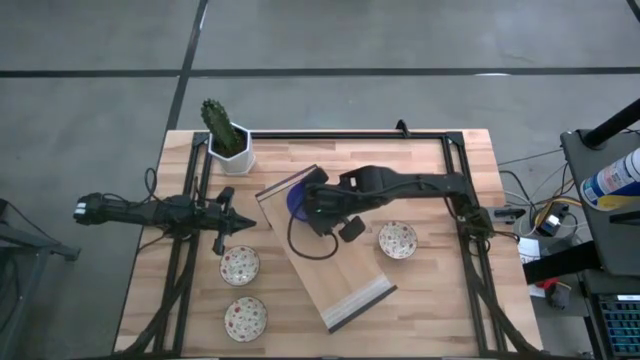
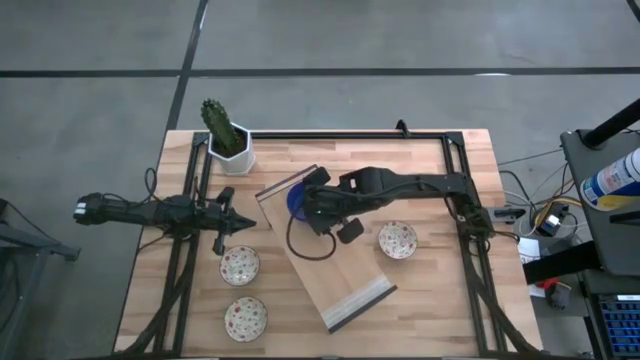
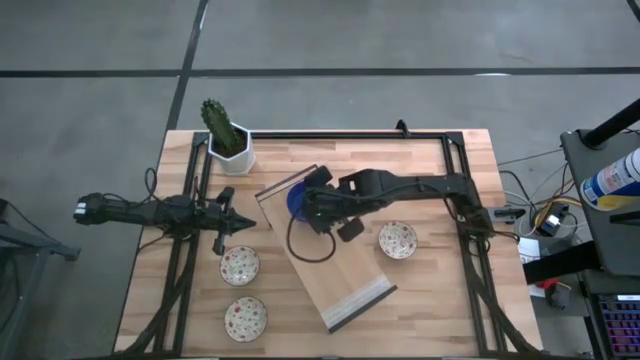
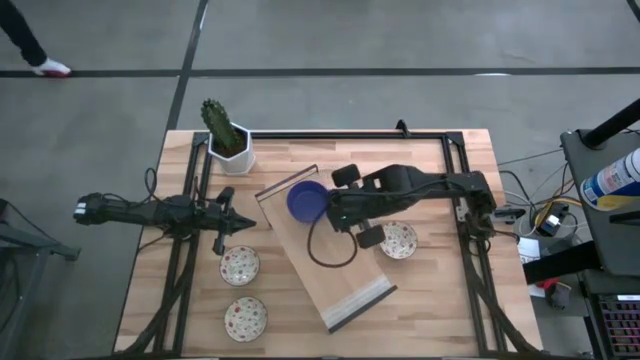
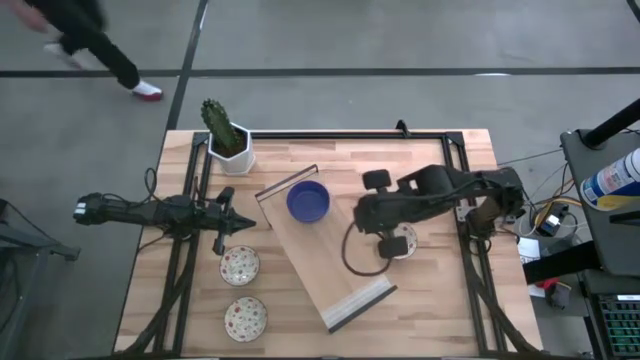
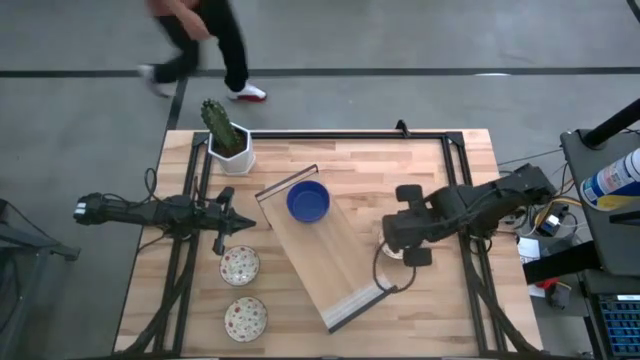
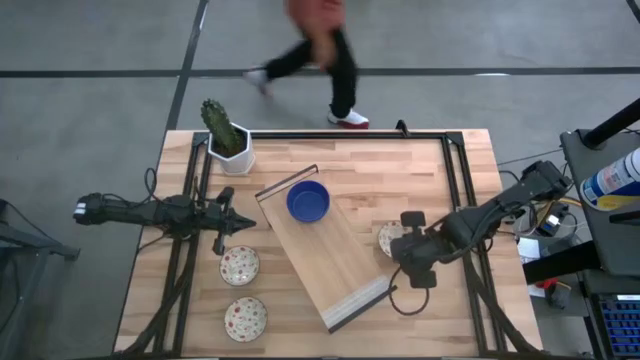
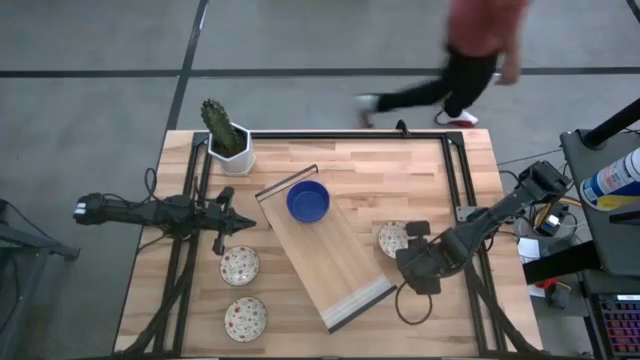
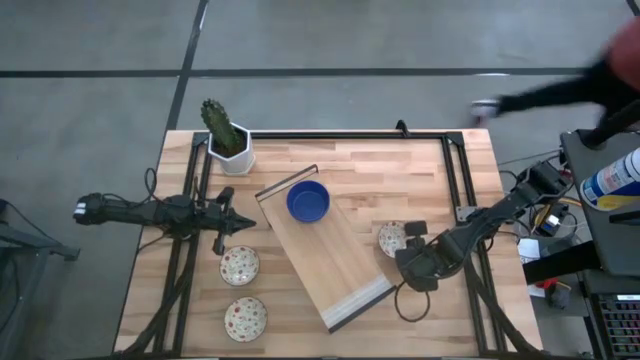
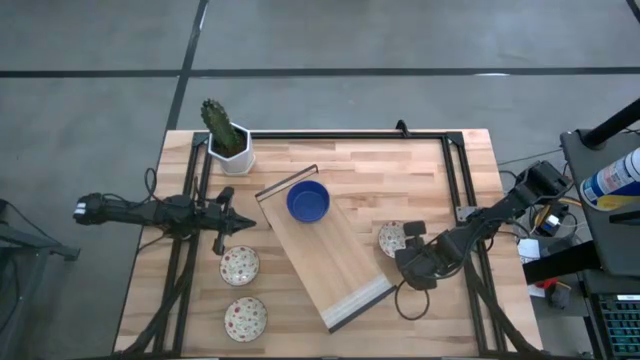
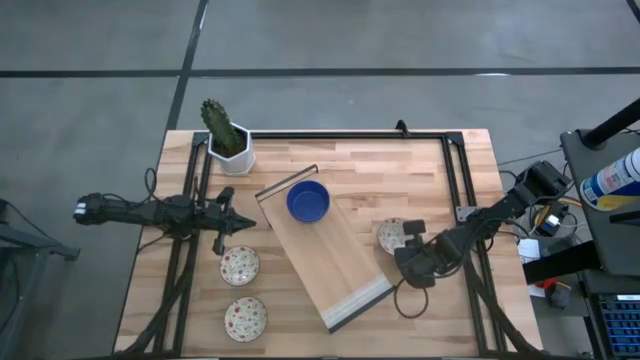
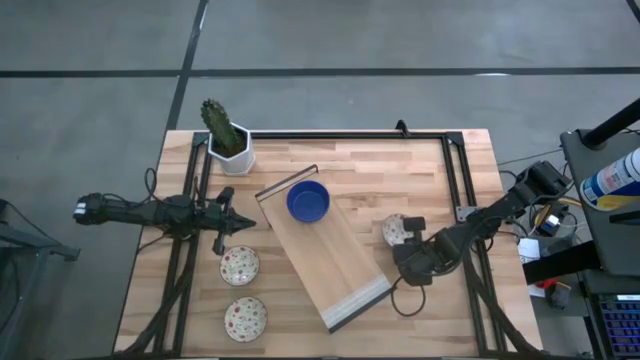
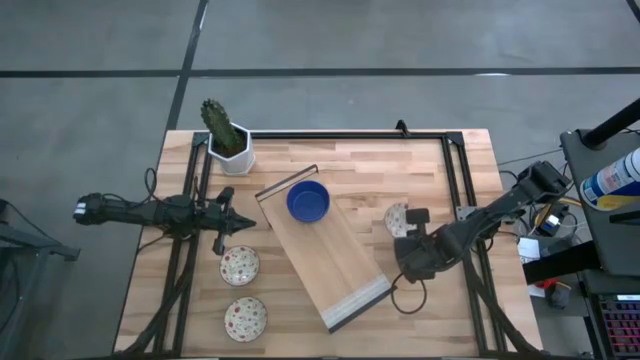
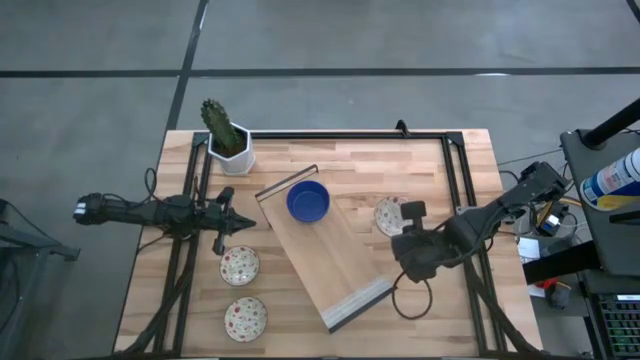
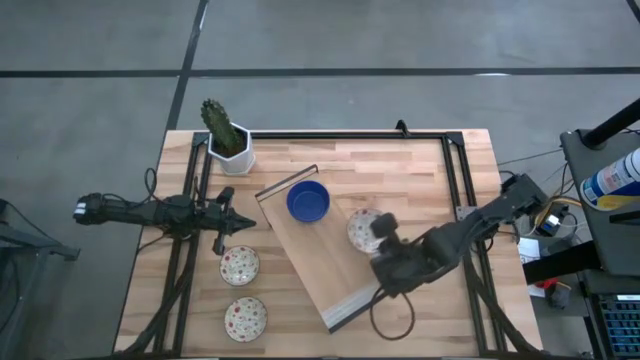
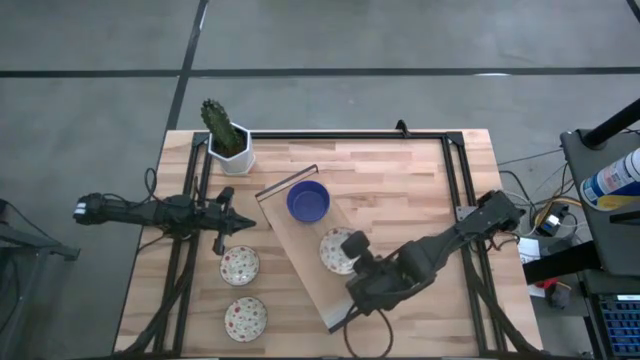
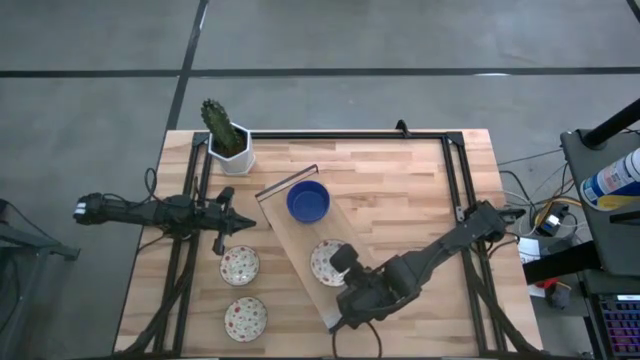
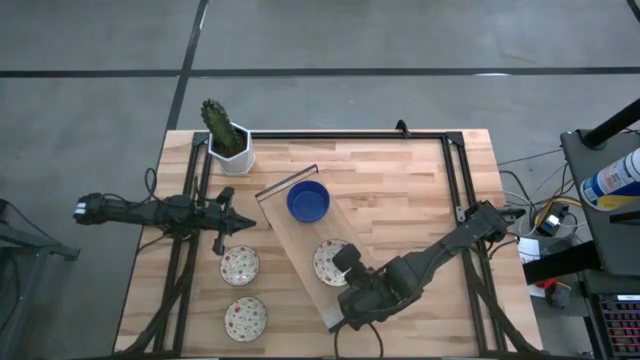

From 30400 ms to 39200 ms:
Task: Pick & Place Mini bowls
Put the top right white patterned bowl on the shelf

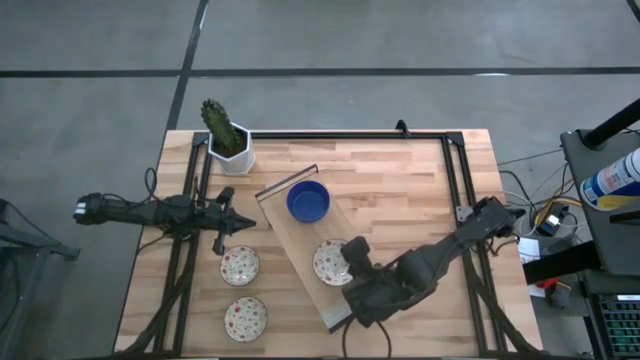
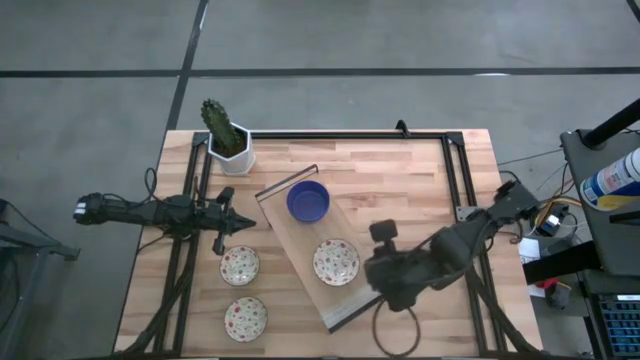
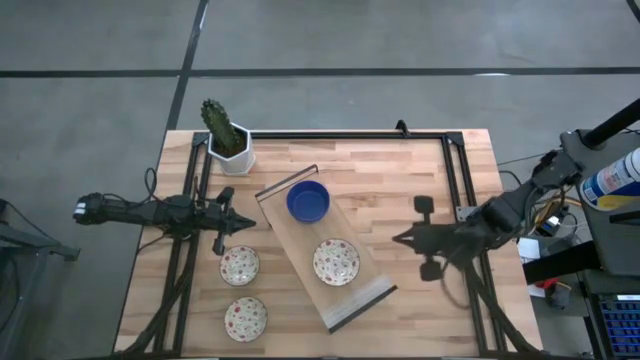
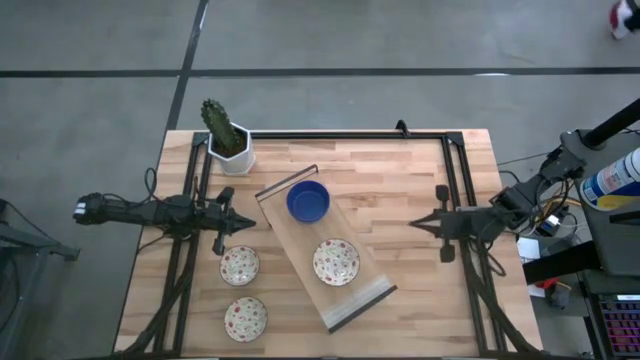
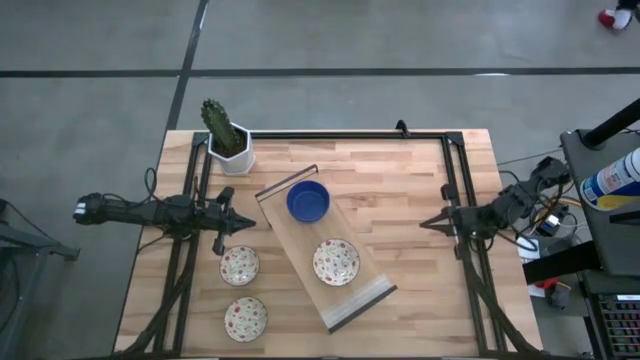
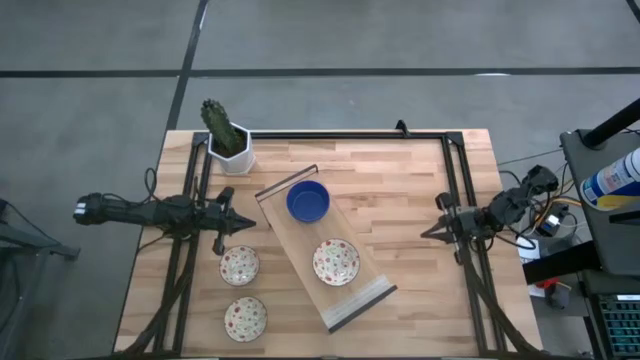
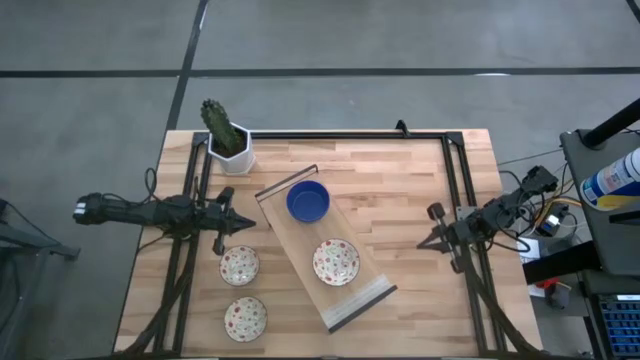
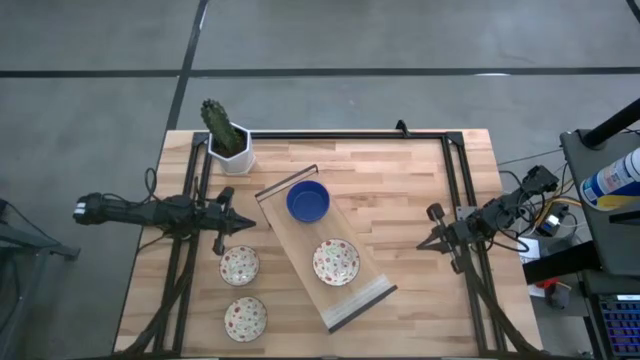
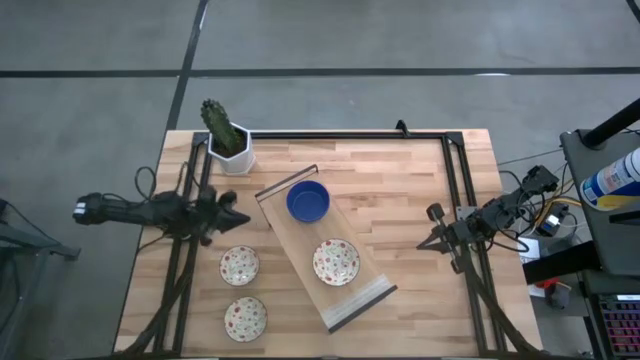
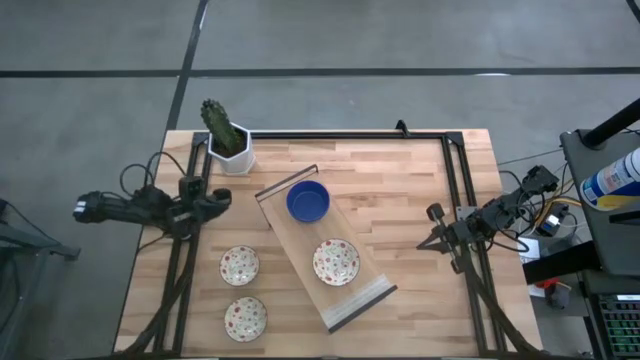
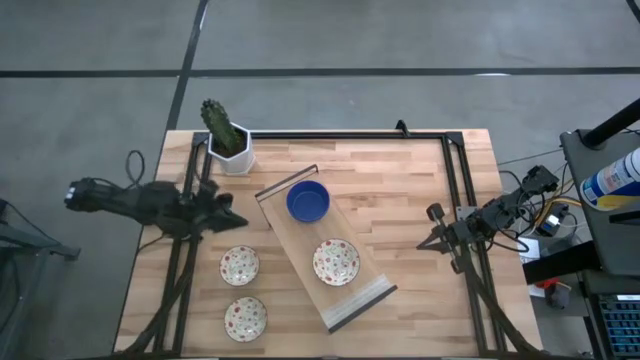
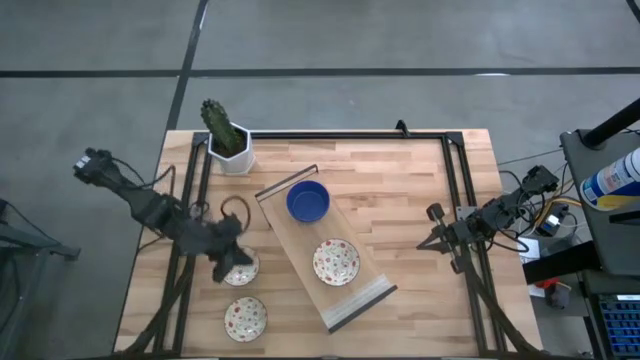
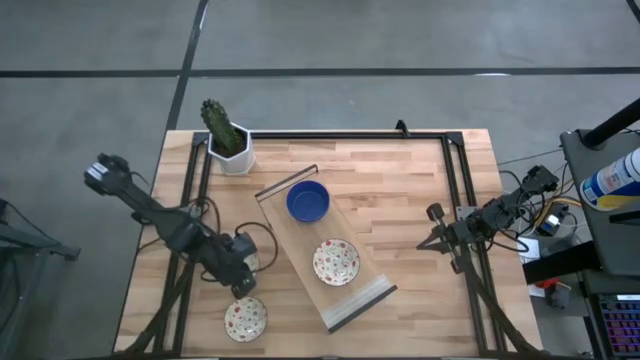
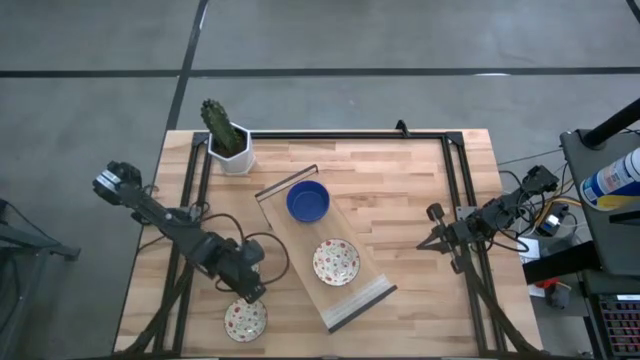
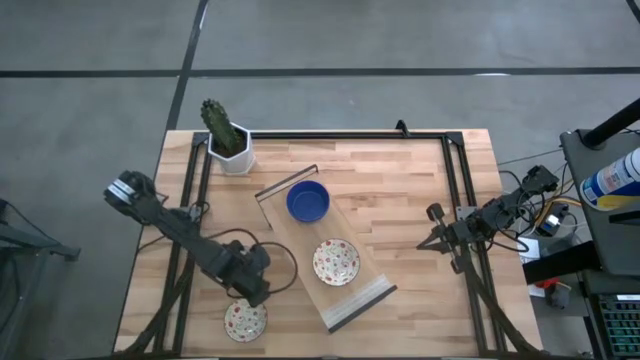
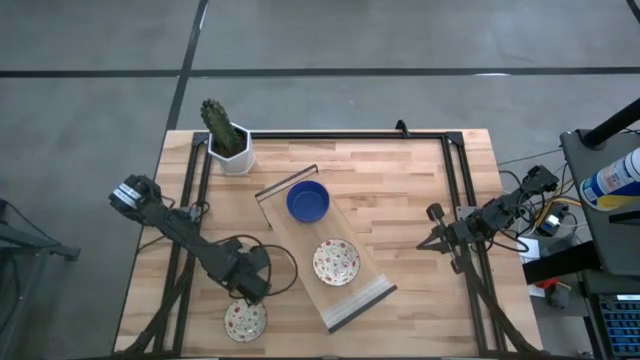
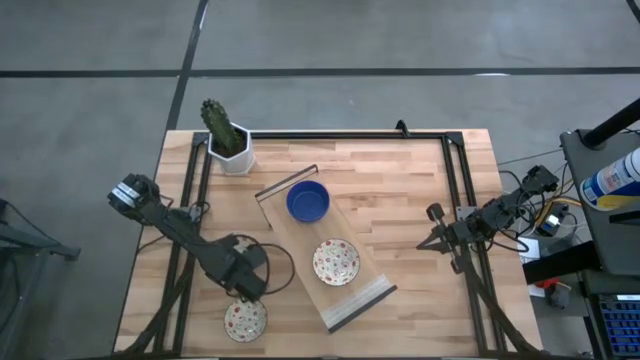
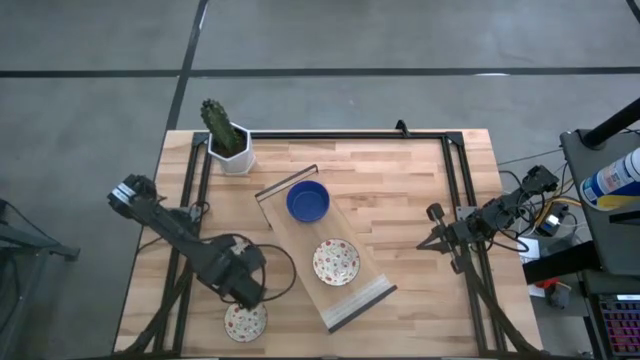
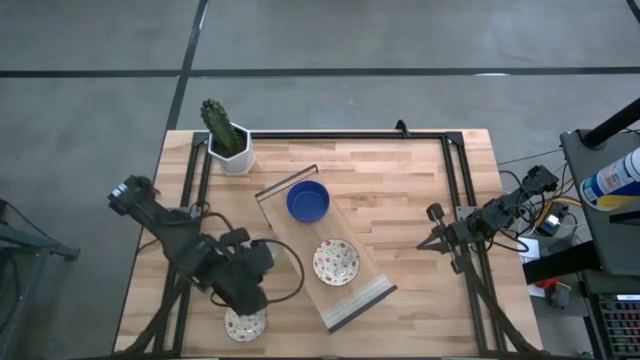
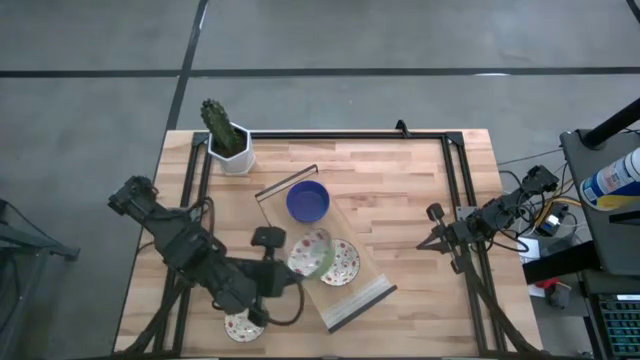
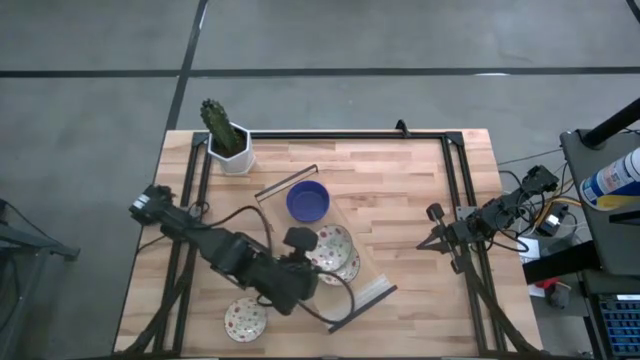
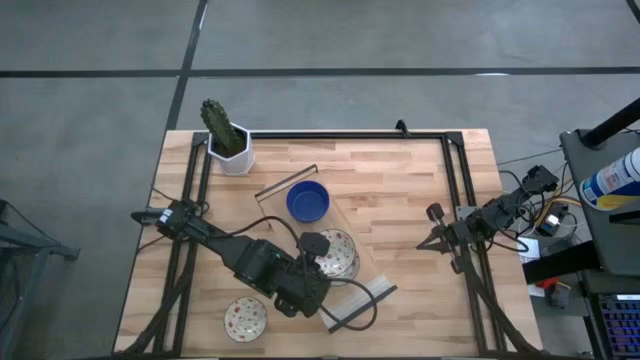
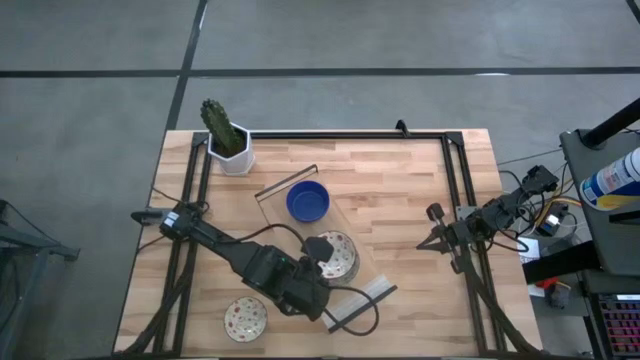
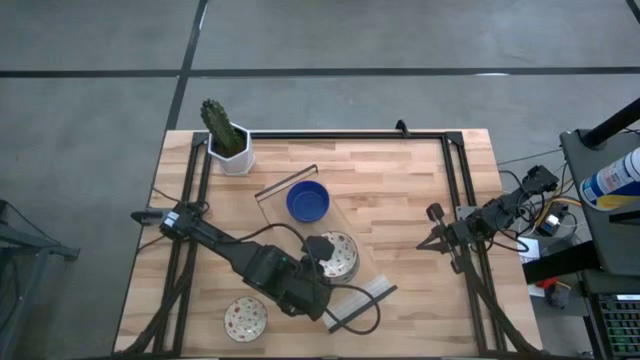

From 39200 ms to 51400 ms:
Stack the top white patterned bowl on the white patterned bowl on the shelf
